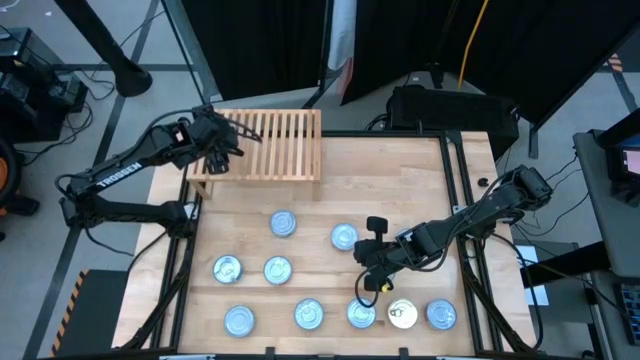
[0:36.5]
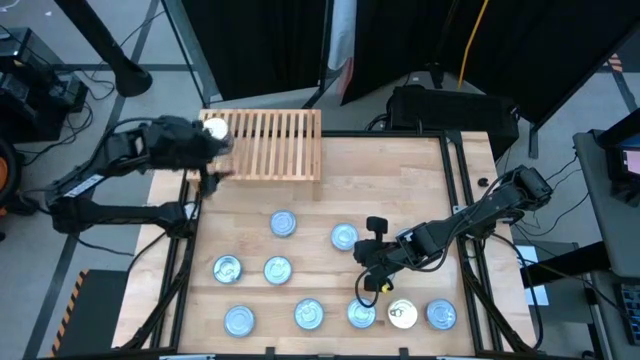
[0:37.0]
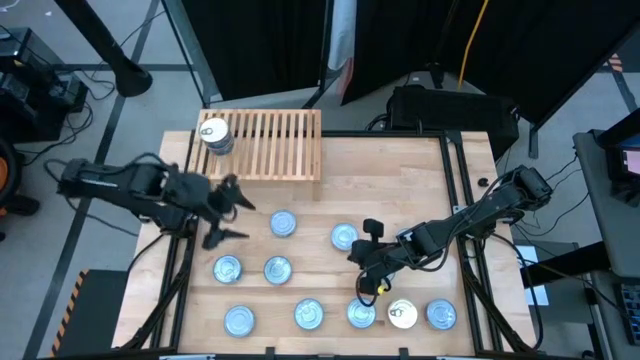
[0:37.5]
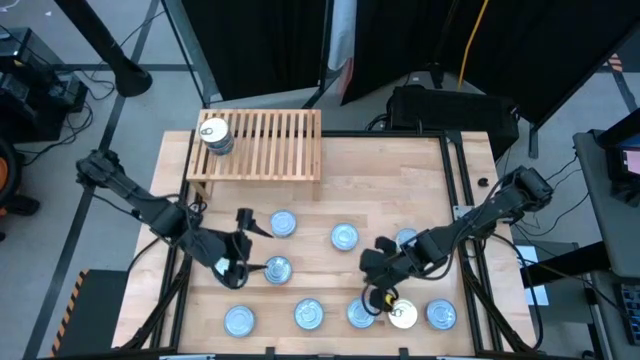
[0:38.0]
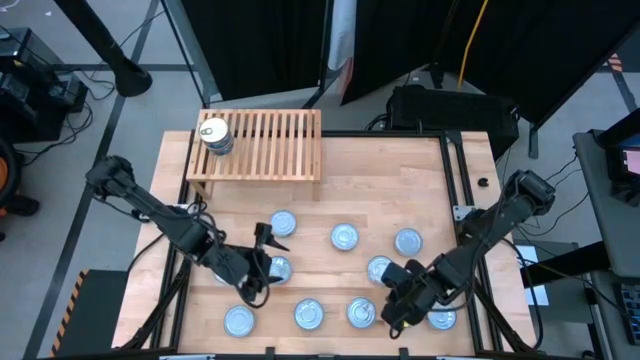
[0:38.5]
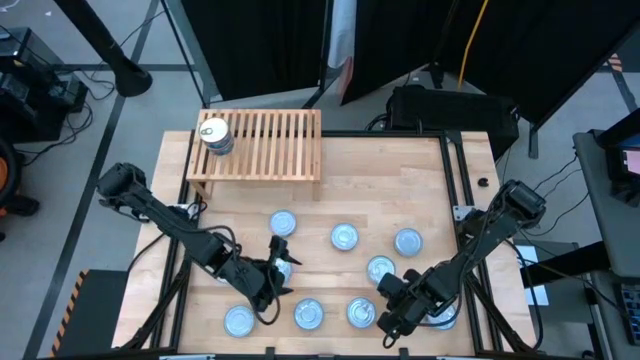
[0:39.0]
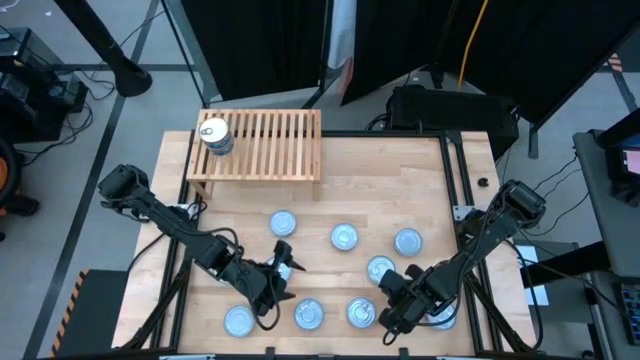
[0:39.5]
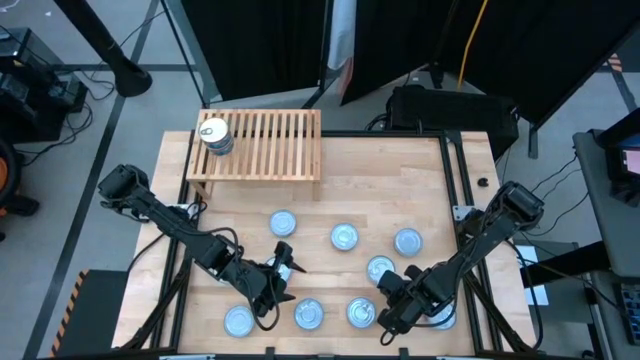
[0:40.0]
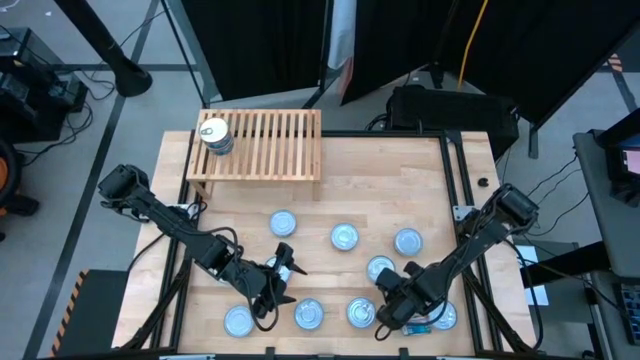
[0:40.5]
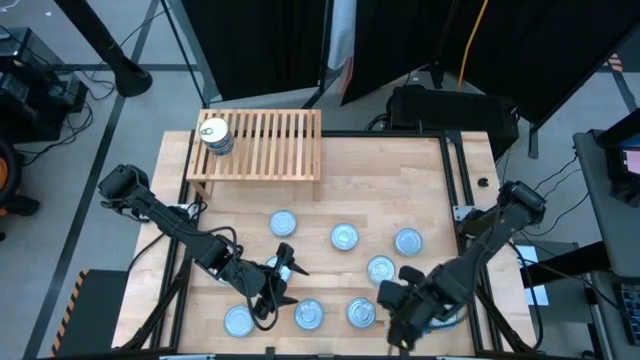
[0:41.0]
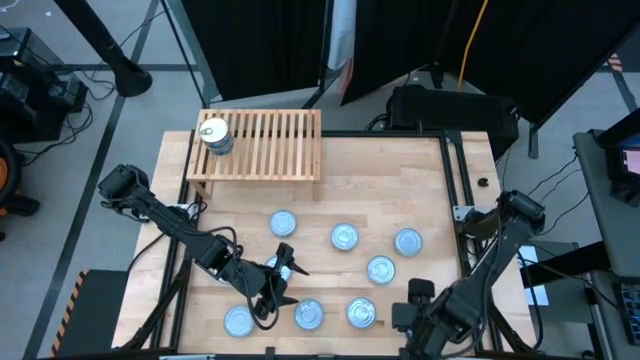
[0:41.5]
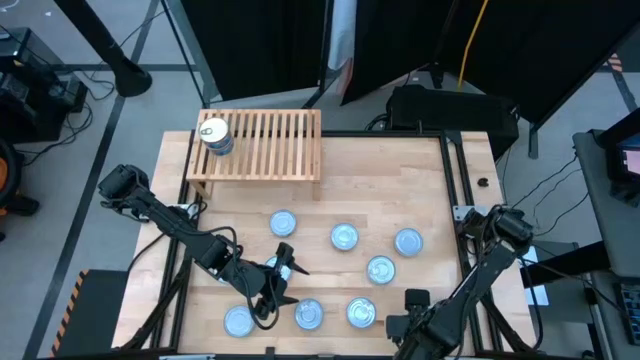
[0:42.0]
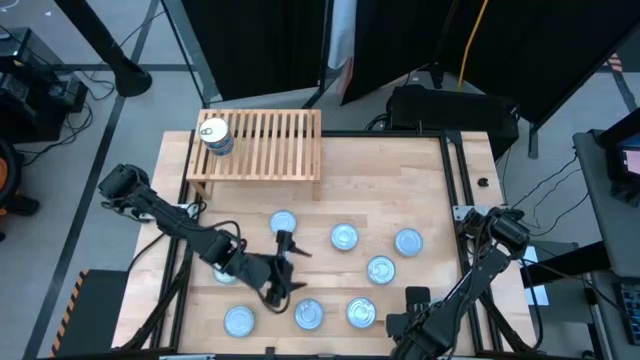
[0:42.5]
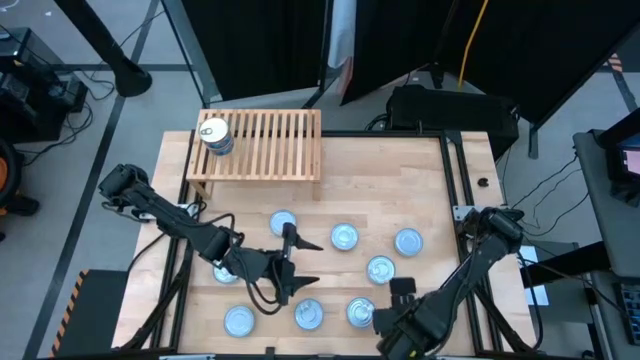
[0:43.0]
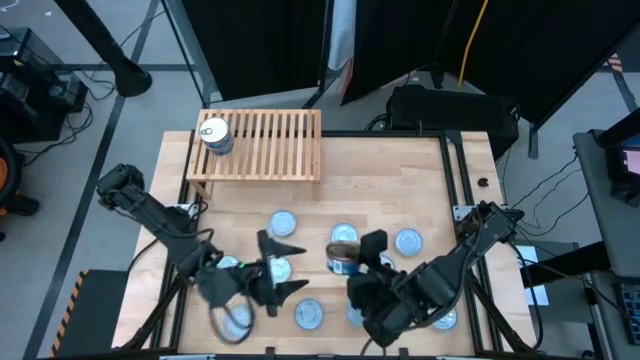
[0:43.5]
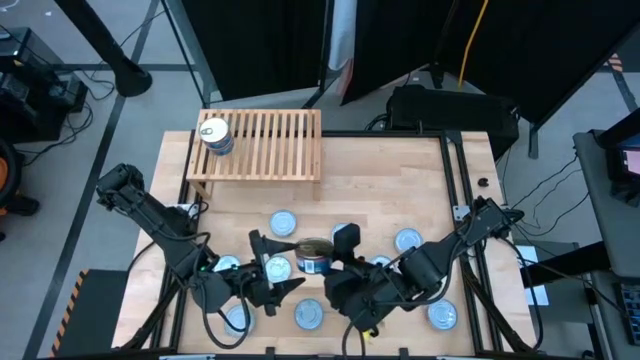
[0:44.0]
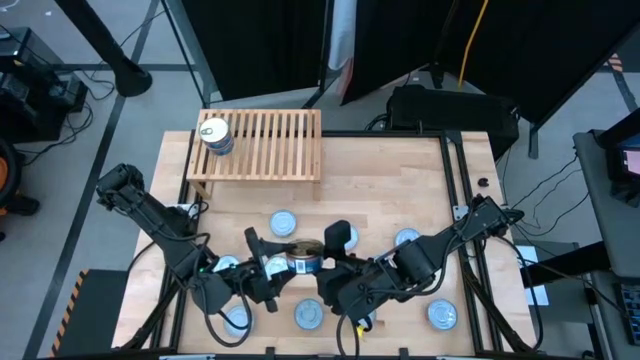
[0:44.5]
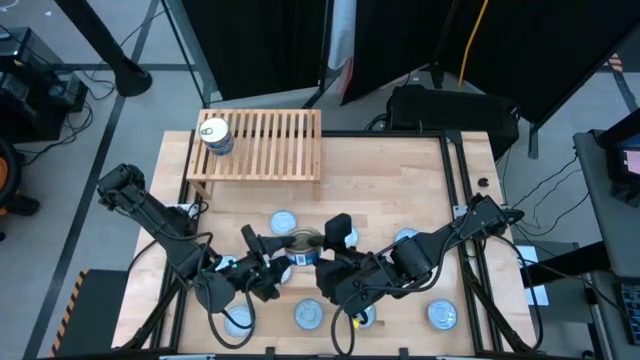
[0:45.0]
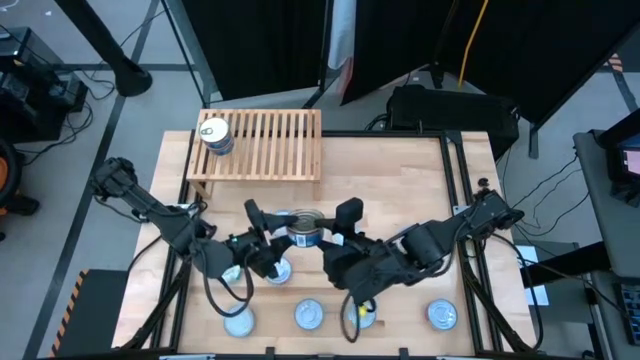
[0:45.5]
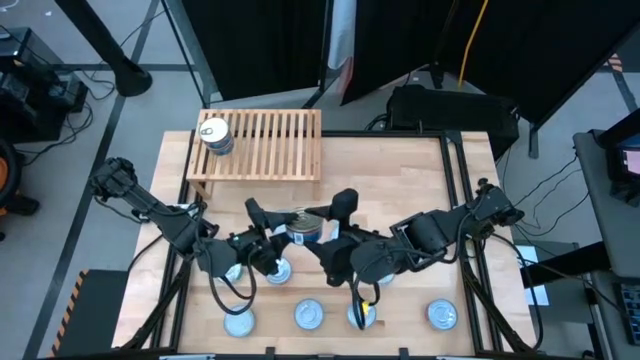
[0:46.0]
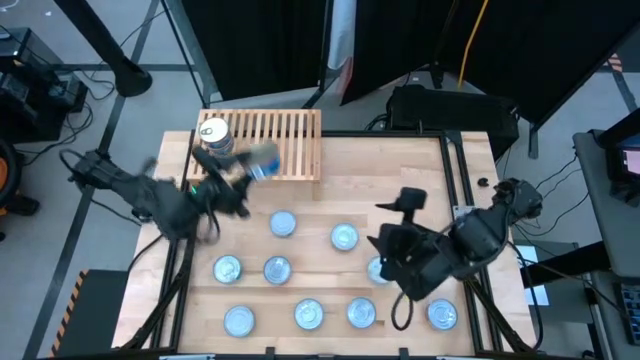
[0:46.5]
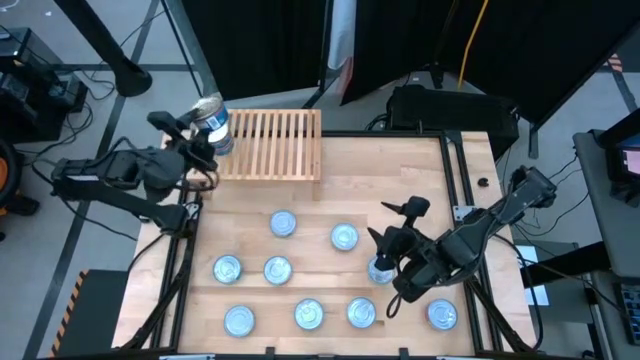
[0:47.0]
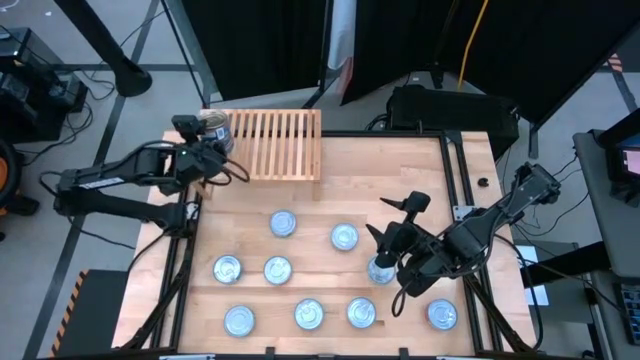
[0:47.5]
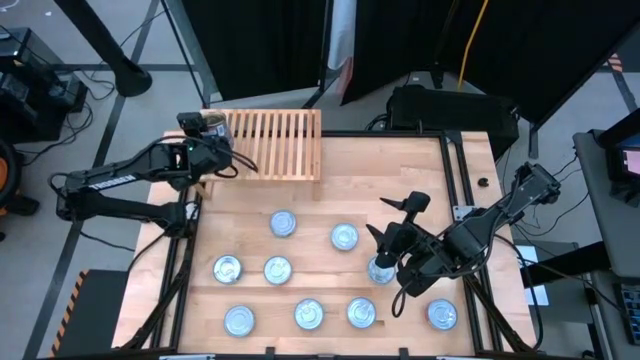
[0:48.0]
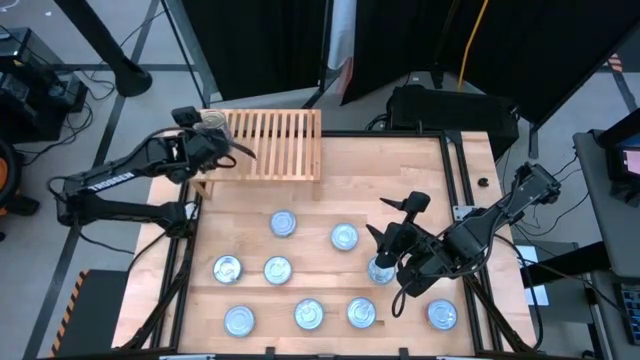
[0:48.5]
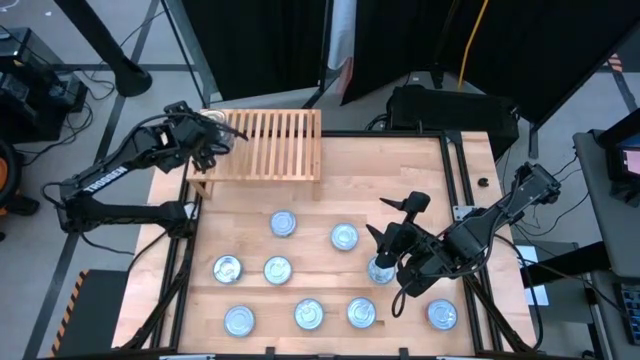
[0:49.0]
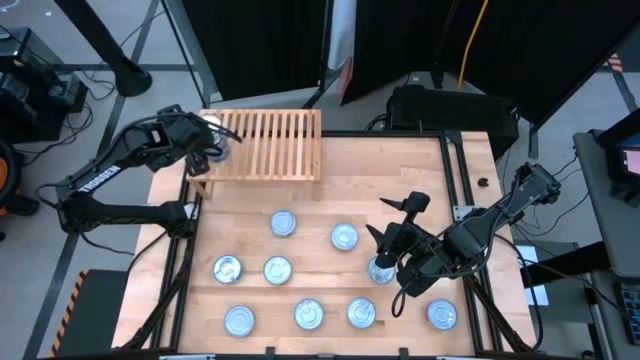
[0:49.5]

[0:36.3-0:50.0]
Task: Stack canned seafood by type on shelf
Stack the blue can on top of the other blue can

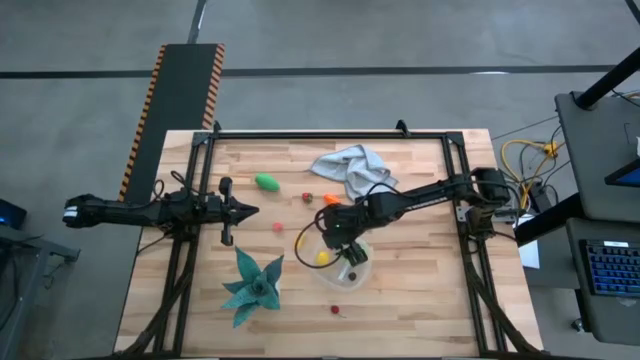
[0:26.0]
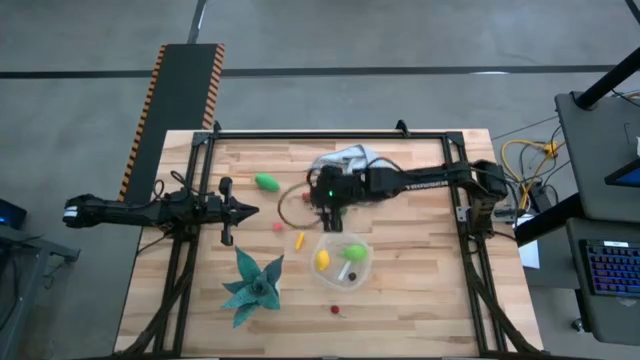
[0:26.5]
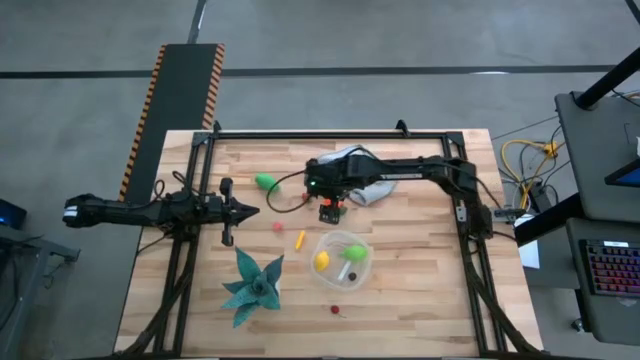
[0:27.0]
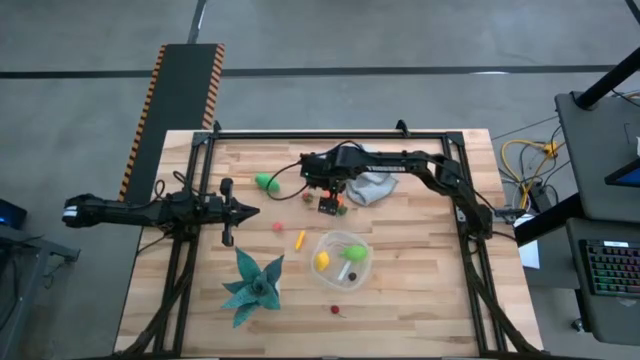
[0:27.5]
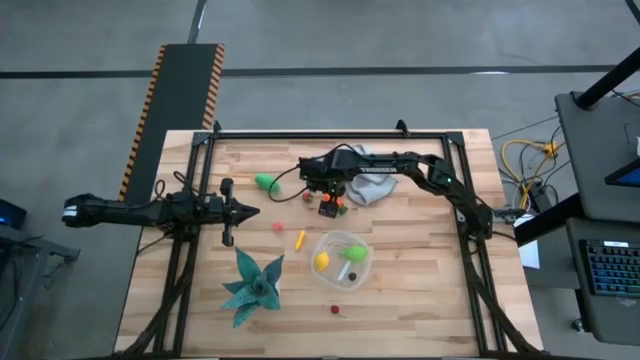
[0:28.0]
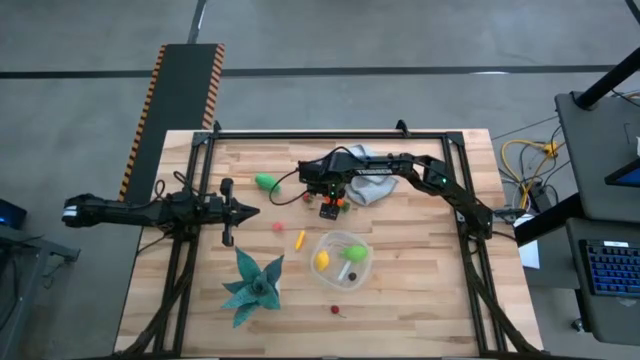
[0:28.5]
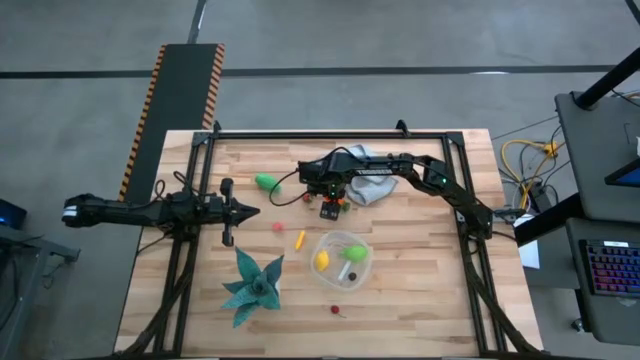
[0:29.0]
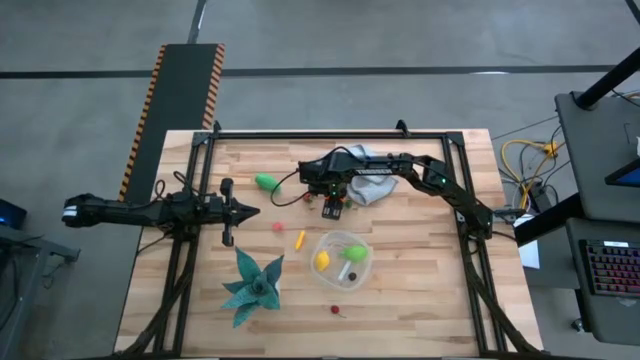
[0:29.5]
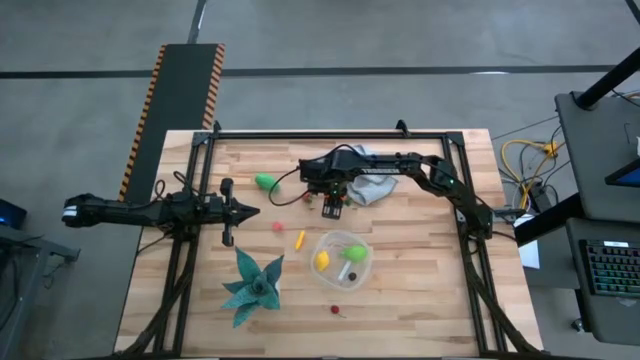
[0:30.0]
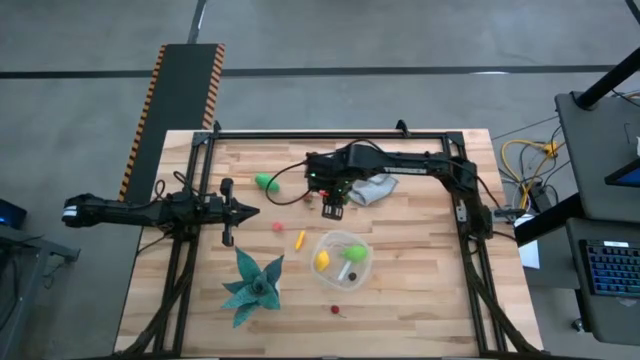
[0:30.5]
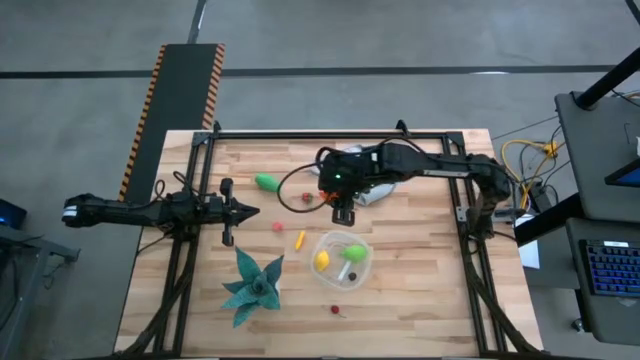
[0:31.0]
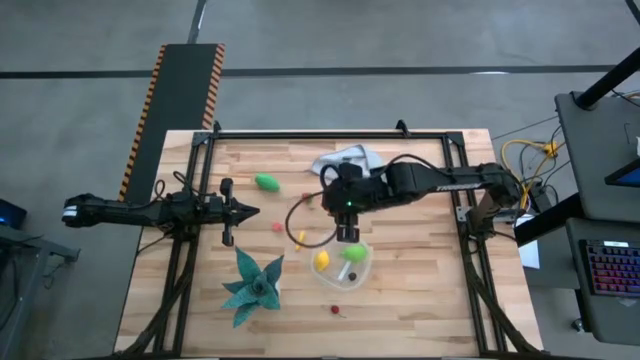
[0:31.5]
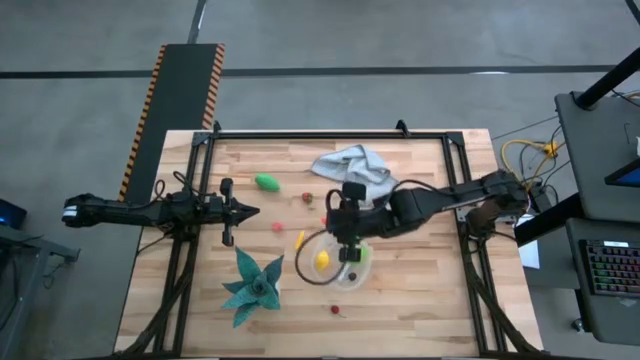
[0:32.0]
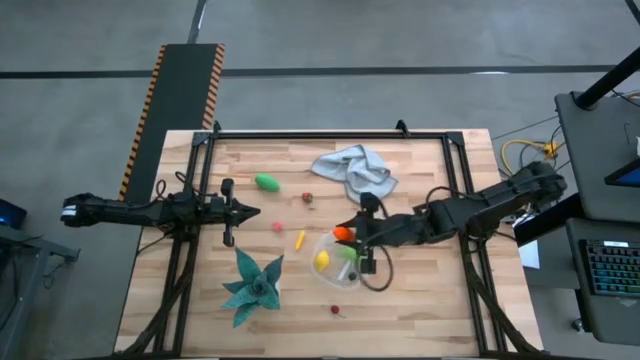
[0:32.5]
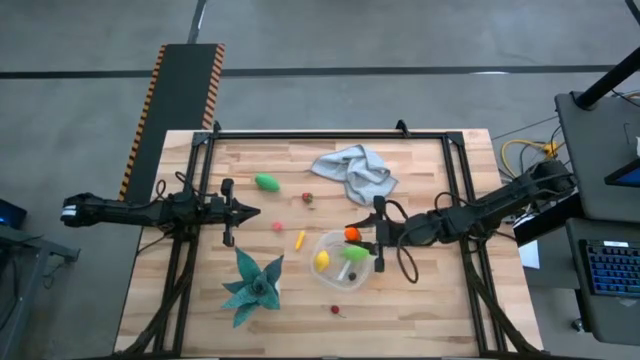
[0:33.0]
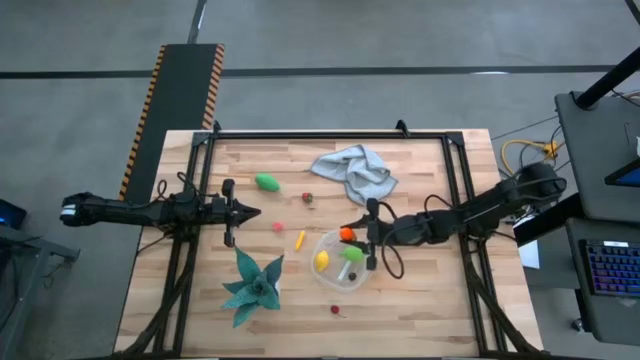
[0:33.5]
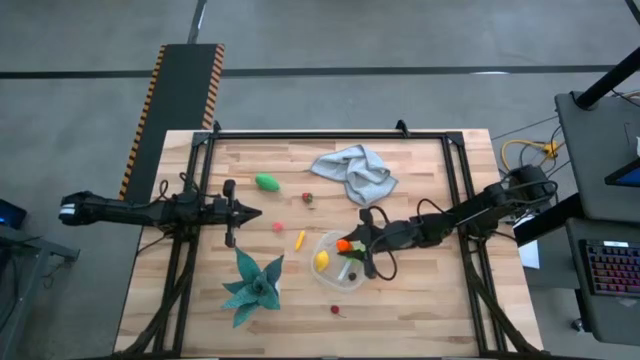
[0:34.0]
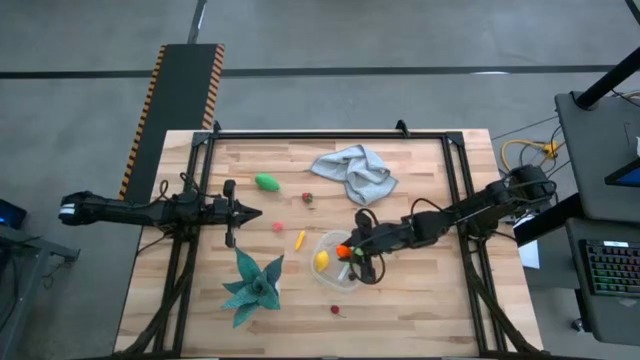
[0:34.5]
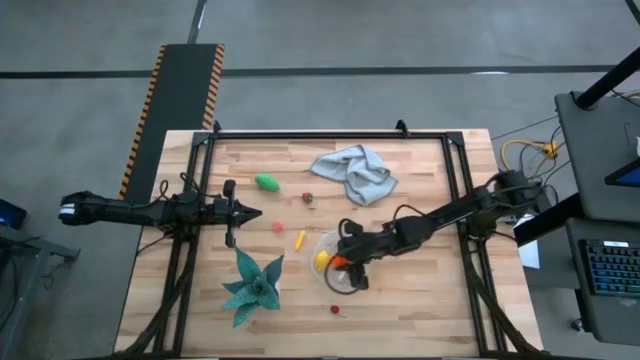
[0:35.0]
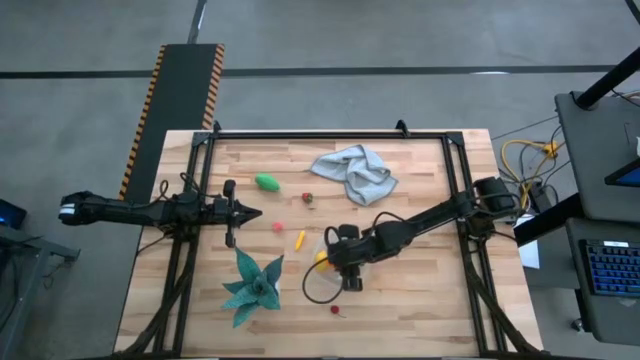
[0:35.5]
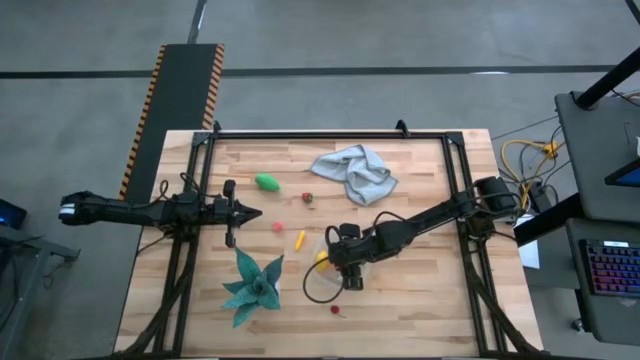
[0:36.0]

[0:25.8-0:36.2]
Task: Pick and placing Produce into tupperware
Put the carrot into the container
